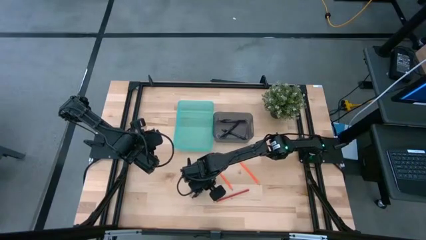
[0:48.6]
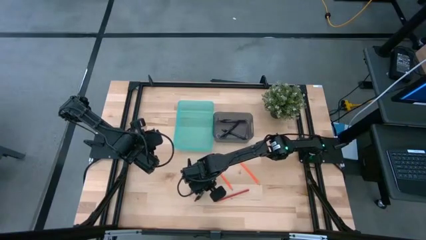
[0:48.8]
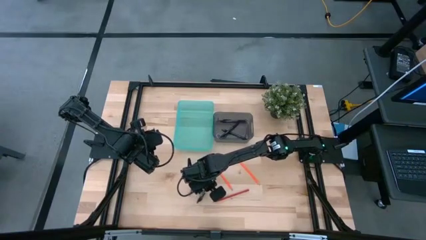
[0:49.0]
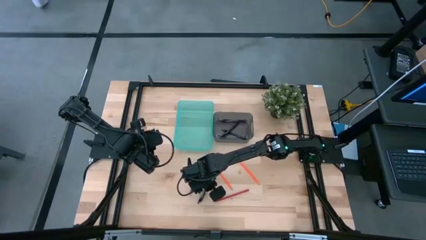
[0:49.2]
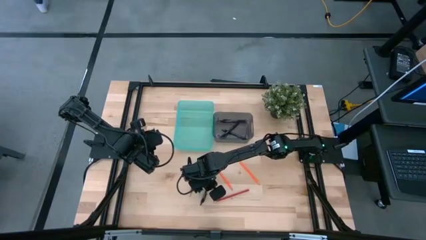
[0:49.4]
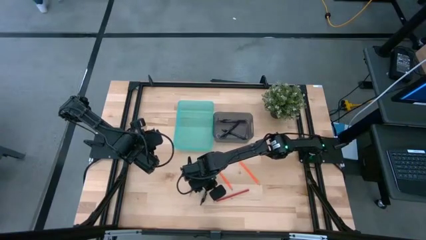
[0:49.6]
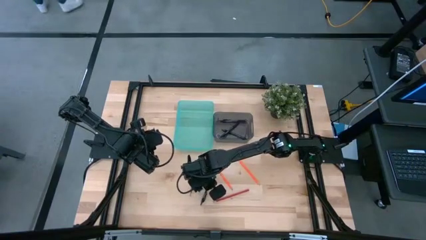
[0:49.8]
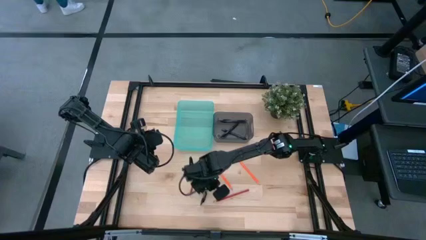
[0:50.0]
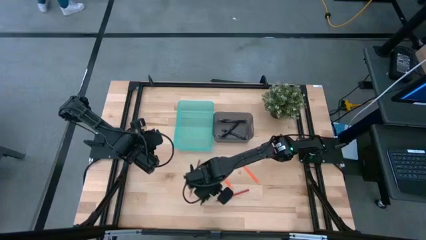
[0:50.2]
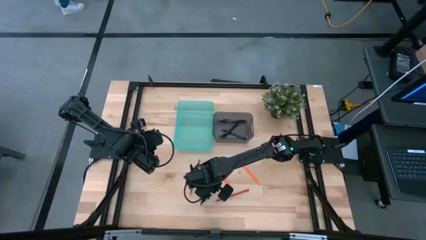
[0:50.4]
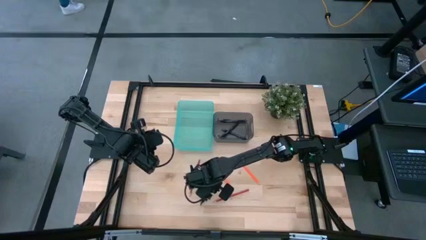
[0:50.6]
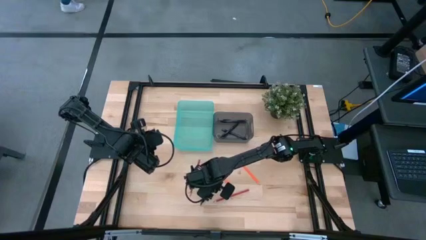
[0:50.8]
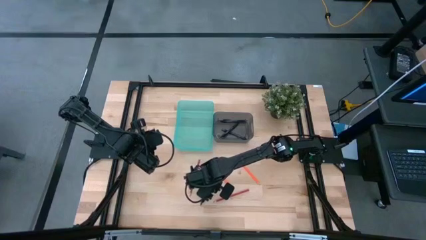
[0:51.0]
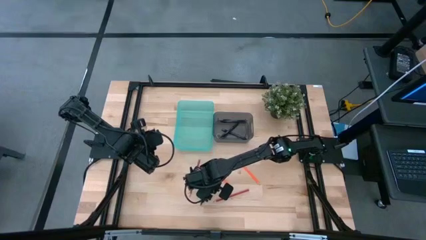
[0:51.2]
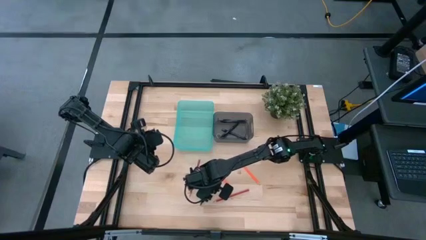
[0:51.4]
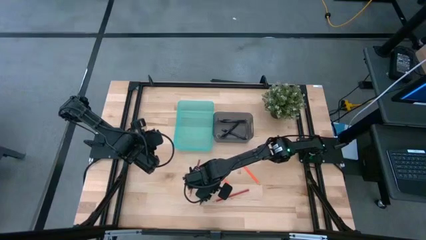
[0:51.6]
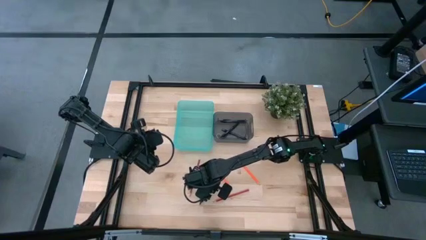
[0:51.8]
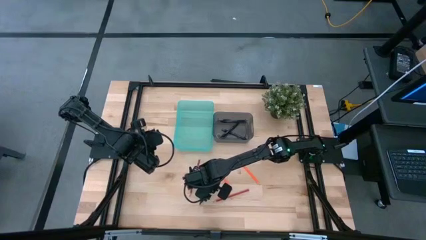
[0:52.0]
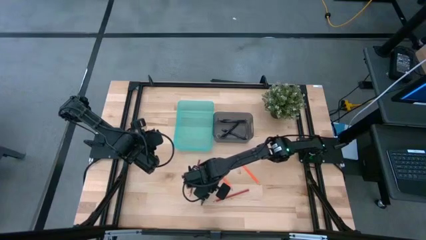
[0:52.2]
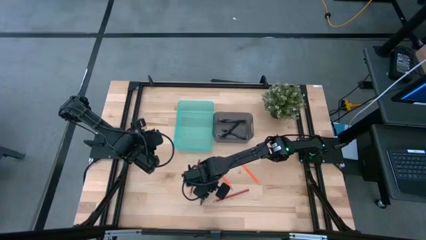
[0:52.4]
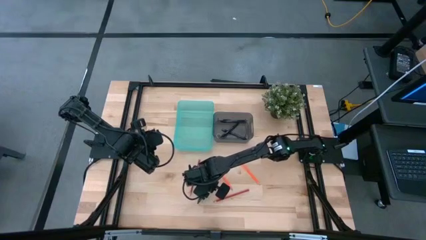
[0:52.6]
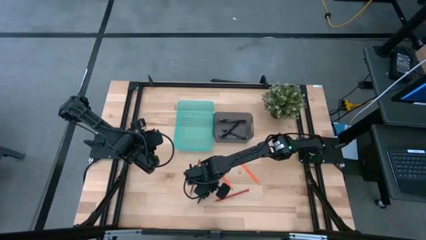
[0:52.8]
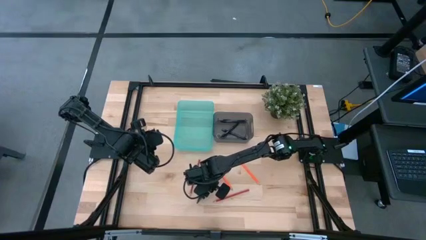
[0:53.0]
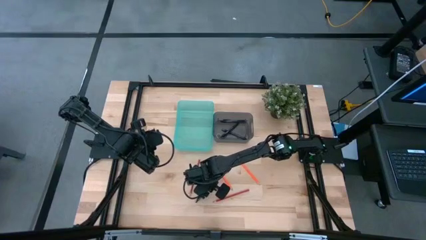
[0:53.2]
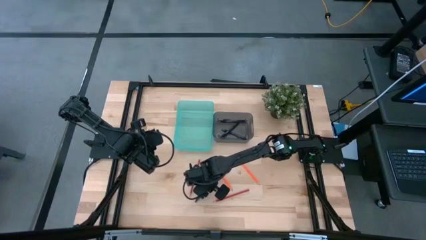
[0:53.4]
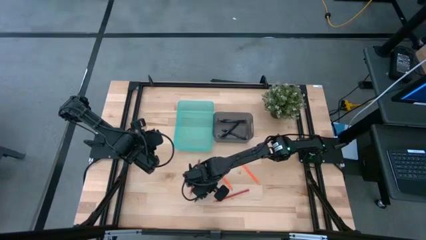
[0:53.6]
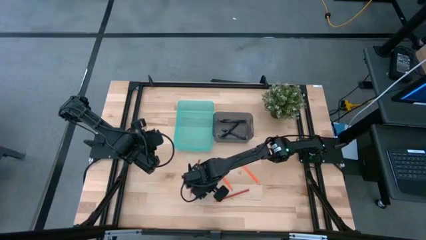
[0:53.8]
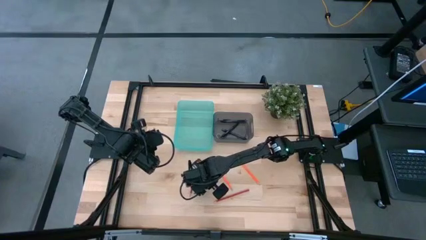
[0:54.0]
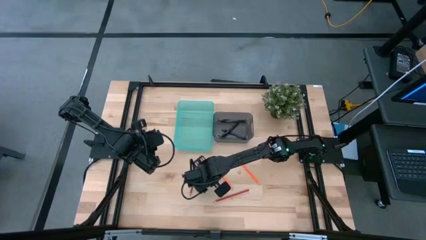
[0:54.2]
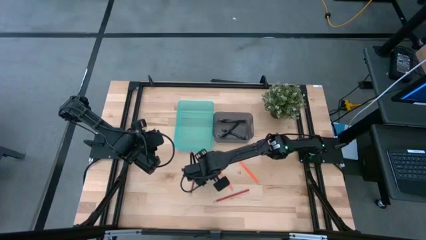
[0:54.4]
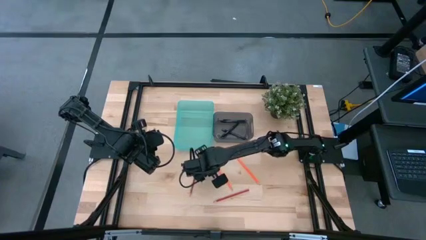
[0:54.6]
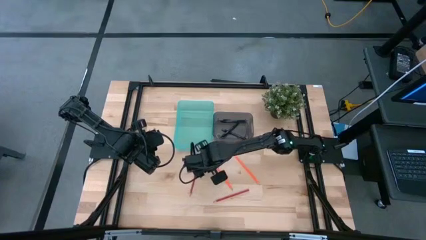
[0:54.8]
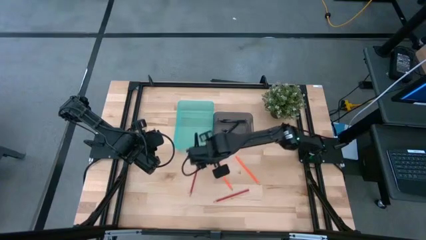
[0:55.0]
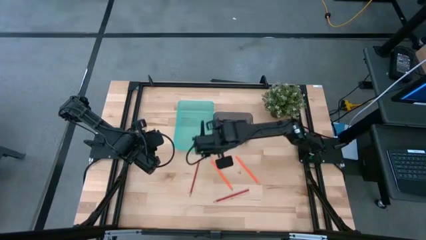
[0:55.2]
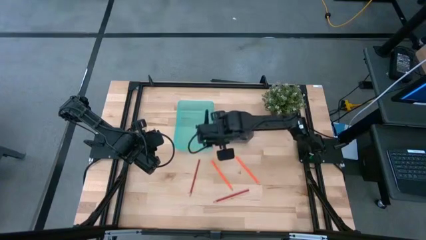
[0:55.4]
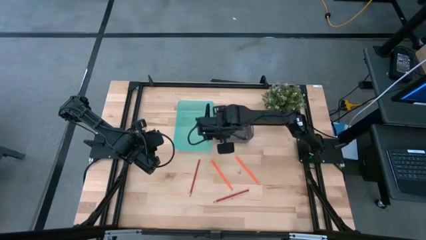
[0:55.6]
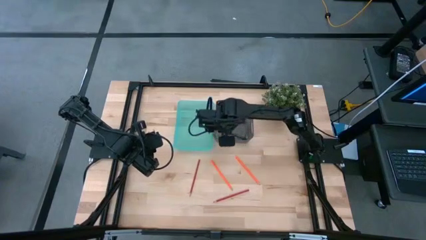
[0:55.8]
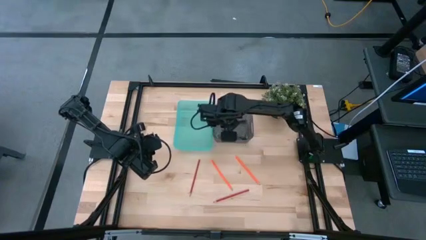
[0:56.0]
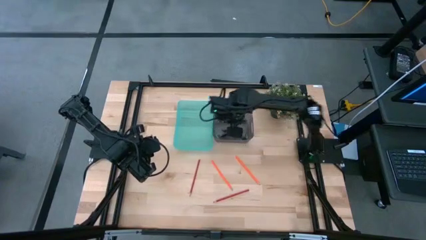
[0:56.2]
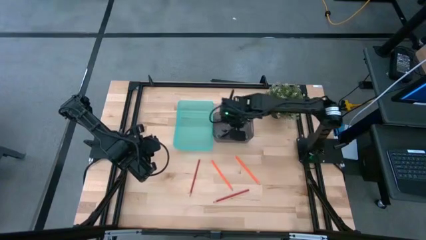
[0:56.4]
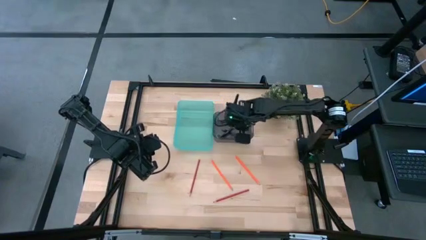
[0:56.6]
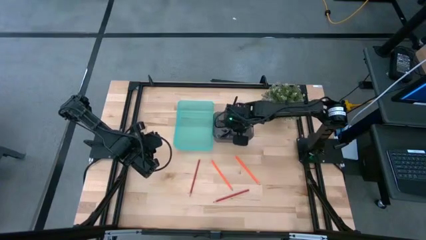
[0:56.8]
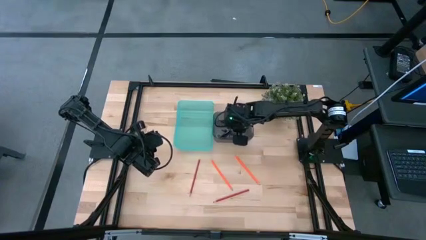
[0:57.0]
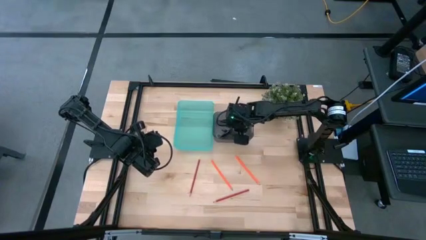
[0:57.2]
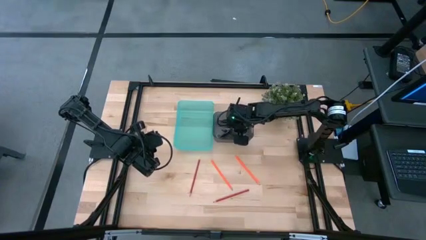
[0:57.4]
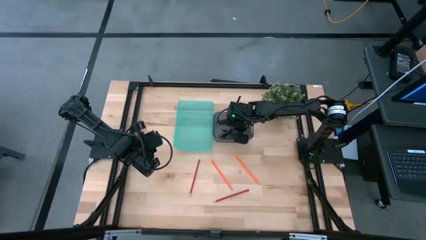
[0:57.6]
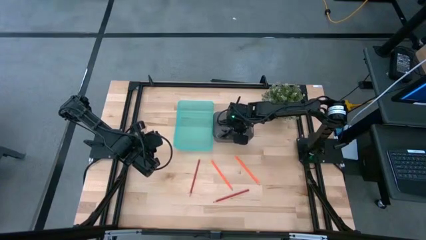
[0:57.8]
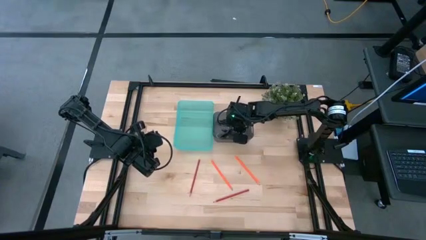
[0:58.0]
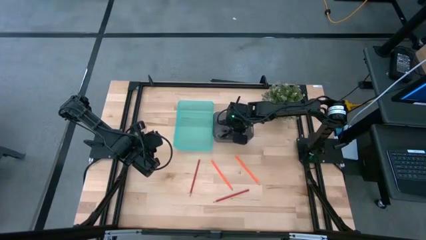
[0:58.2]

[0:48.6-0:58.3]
Task: Sort pens & pencils
Put the black pen into the black bin

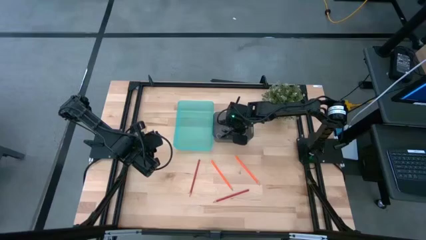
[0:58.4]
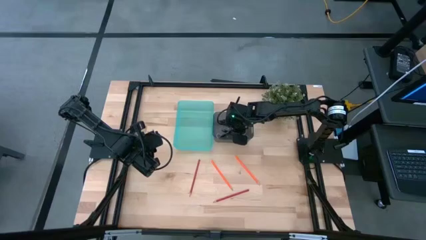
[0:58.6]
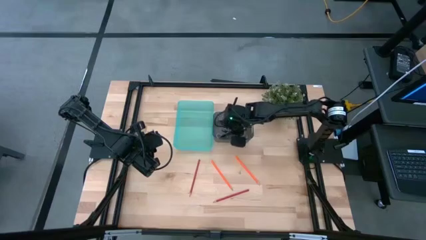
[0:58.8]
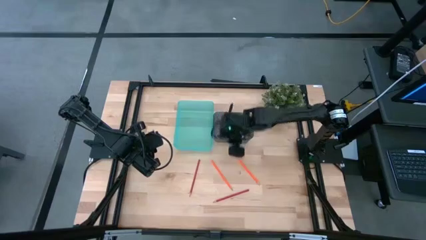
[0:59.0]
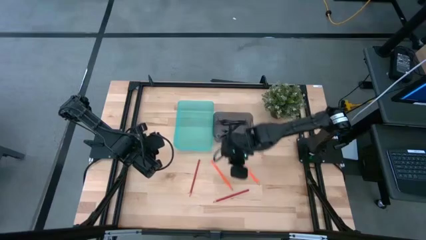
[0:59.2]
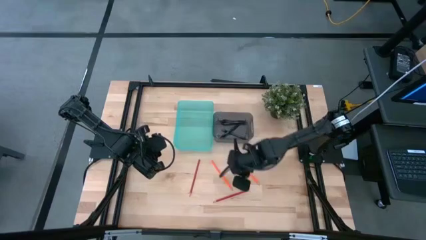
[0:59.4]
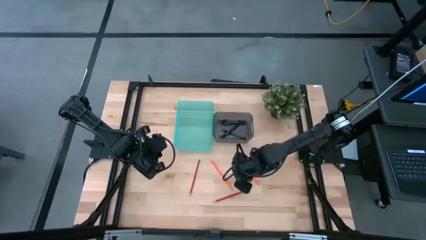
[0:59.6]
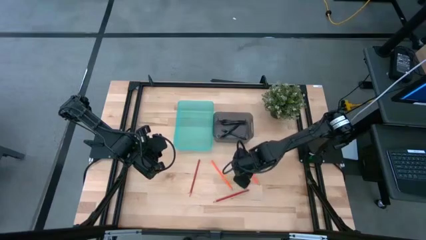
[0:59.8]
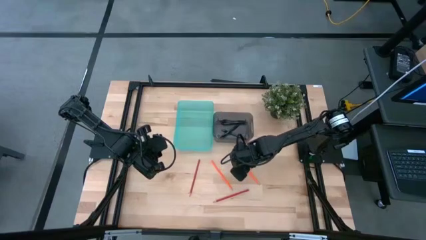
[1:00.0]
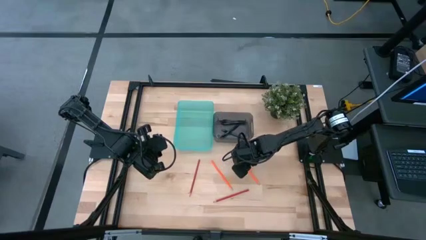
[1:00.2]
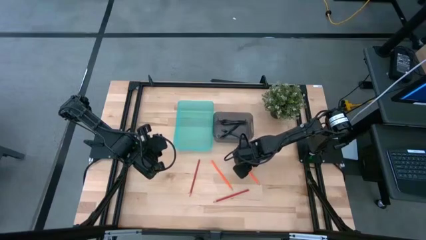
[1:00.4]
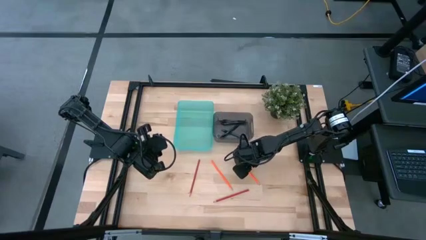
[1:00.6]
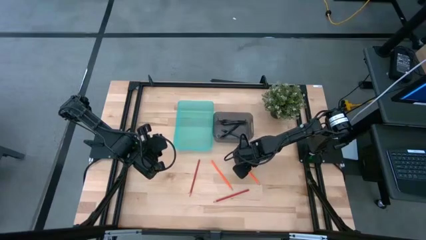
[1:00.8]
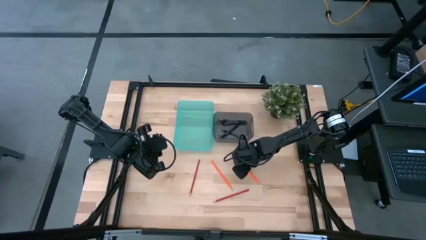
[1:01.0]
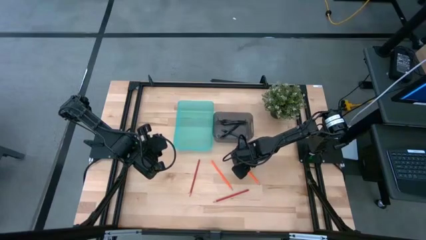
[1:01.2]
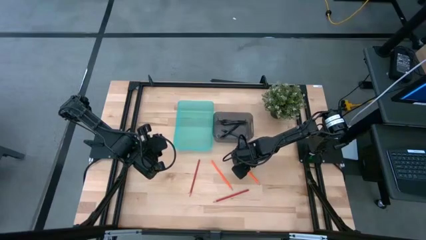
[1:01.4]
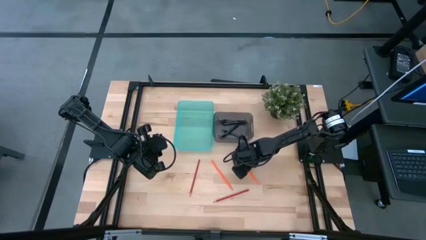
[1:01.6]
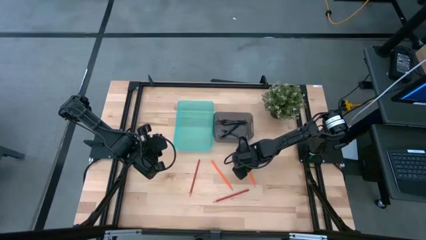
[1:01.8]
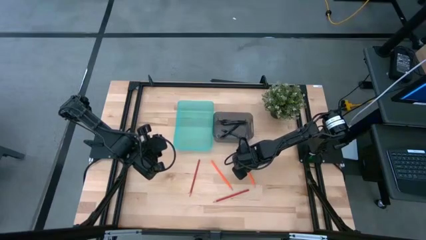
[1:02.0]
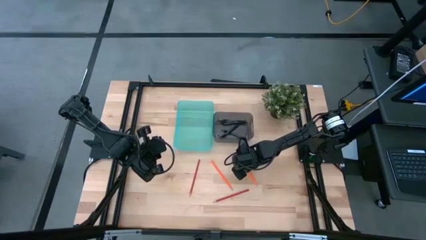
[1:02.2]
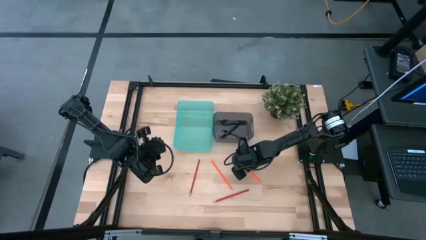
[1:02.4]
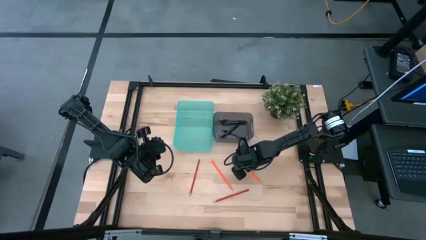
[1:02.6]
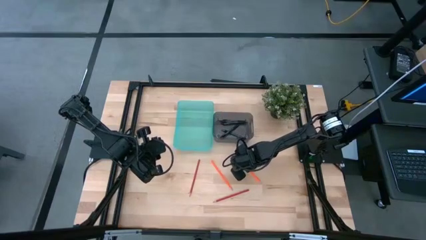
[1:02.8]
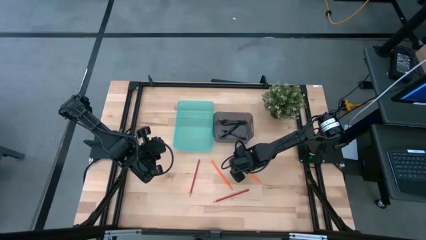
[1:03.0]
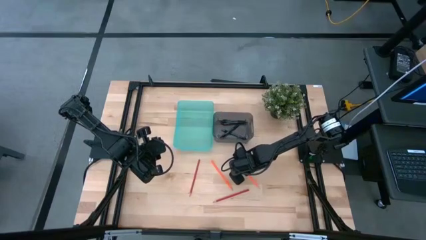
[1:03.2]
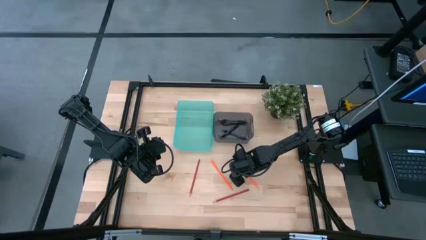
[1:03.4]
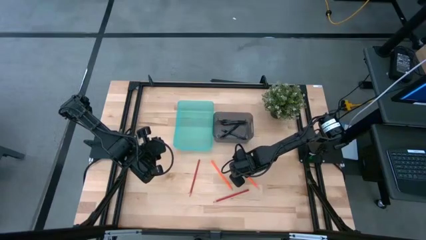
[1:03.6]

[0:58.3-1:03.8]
Put the right orange colored pencil into the green bin
